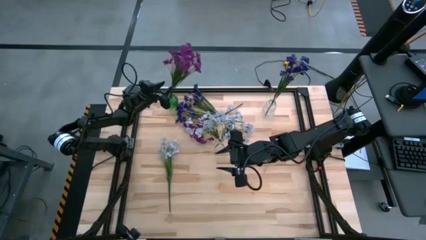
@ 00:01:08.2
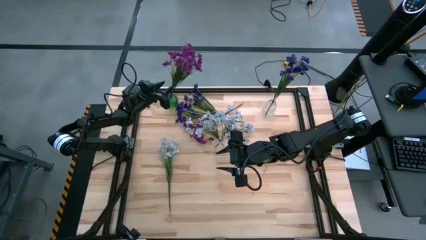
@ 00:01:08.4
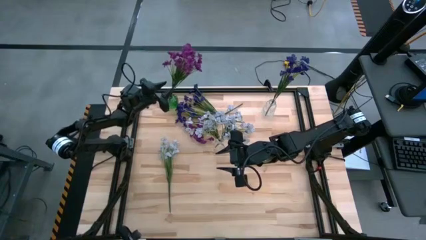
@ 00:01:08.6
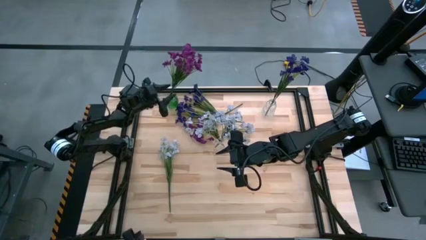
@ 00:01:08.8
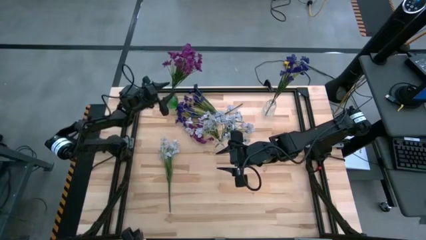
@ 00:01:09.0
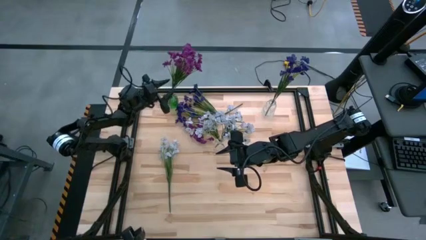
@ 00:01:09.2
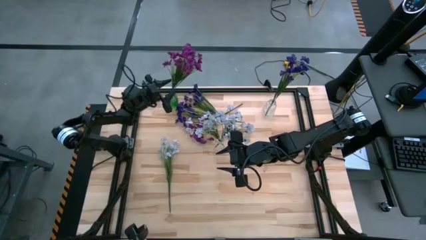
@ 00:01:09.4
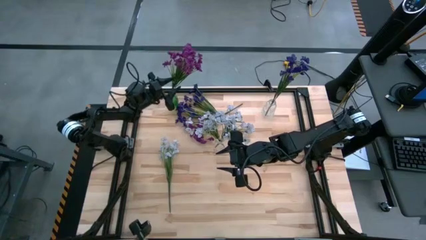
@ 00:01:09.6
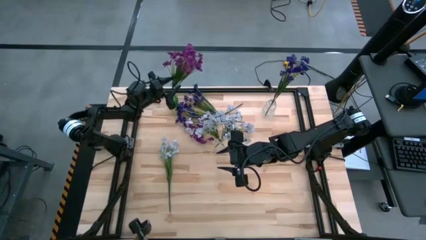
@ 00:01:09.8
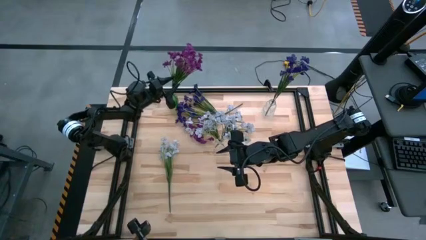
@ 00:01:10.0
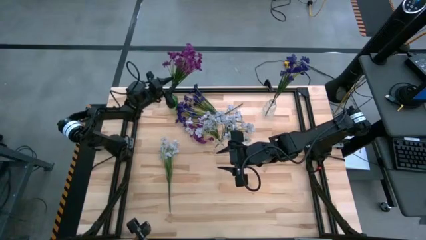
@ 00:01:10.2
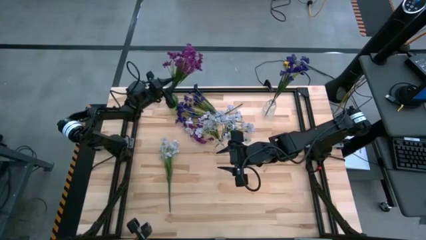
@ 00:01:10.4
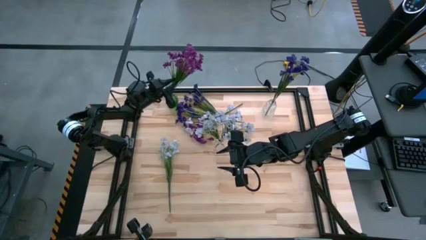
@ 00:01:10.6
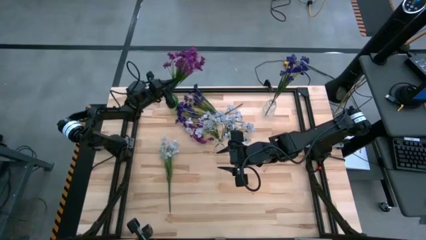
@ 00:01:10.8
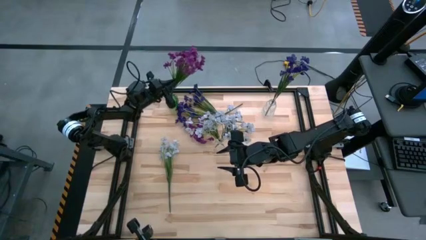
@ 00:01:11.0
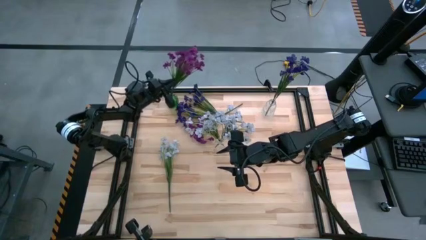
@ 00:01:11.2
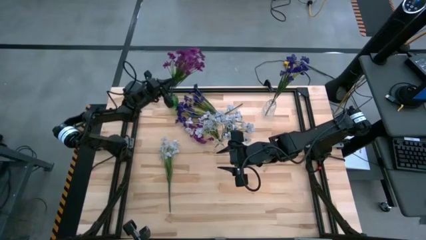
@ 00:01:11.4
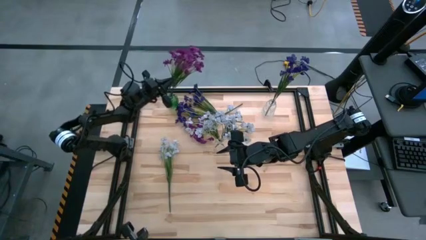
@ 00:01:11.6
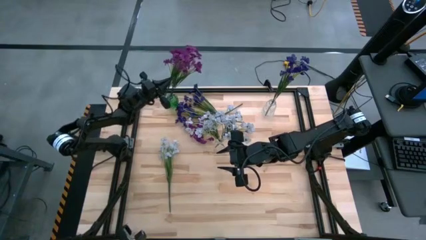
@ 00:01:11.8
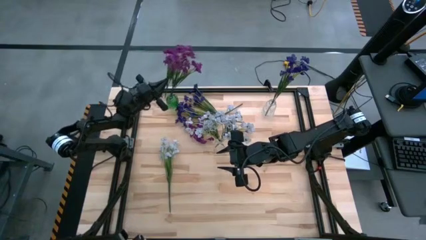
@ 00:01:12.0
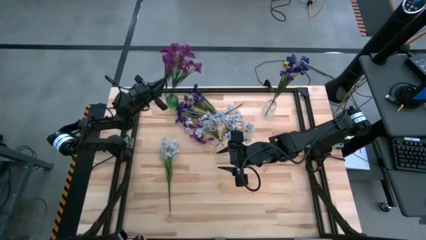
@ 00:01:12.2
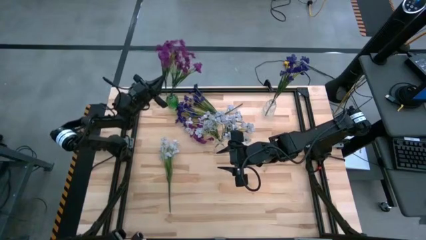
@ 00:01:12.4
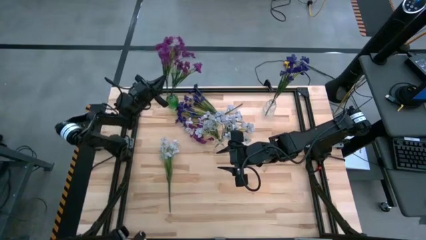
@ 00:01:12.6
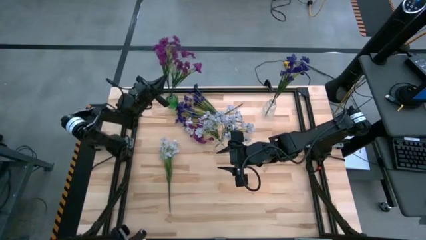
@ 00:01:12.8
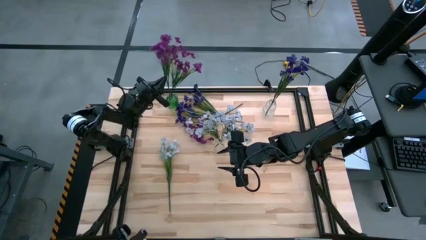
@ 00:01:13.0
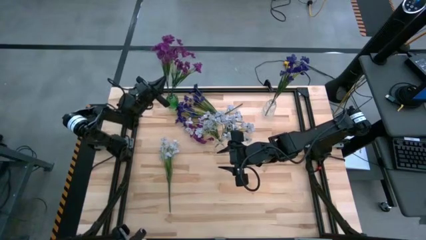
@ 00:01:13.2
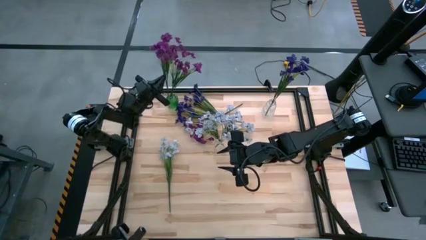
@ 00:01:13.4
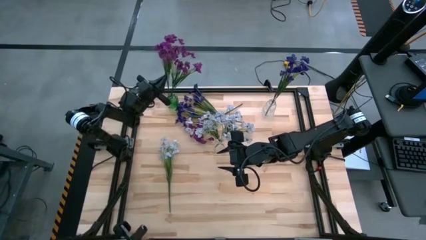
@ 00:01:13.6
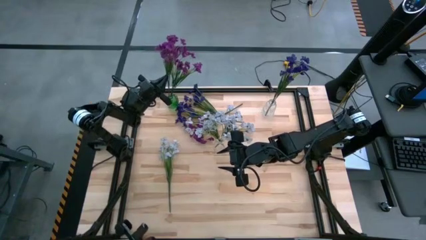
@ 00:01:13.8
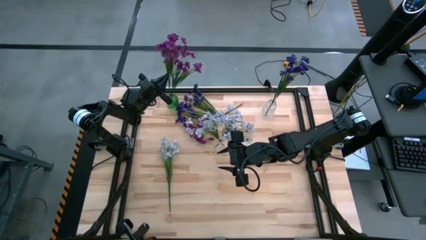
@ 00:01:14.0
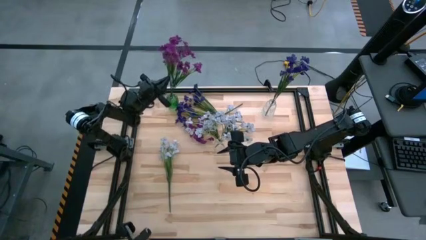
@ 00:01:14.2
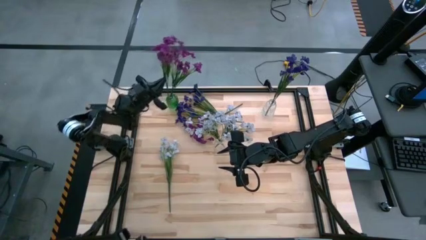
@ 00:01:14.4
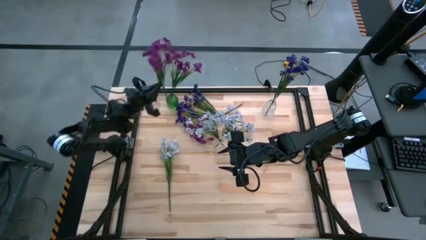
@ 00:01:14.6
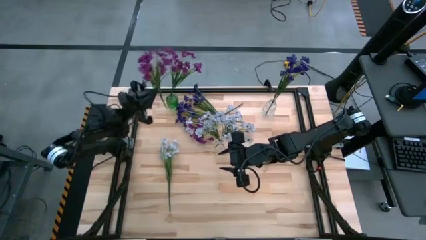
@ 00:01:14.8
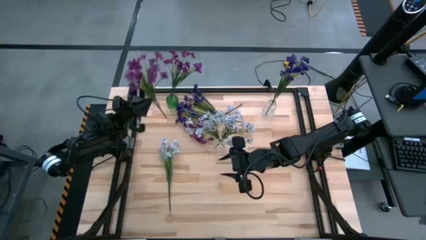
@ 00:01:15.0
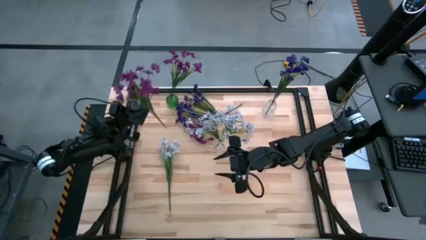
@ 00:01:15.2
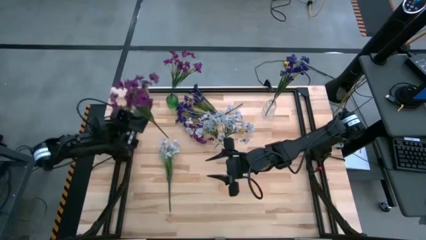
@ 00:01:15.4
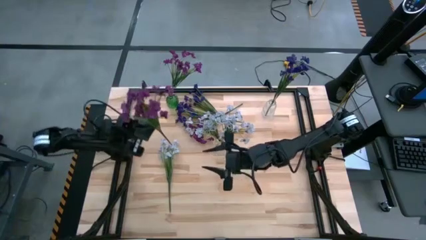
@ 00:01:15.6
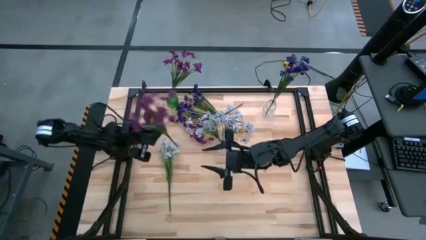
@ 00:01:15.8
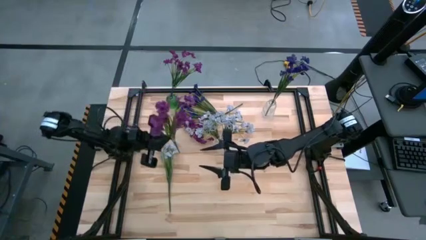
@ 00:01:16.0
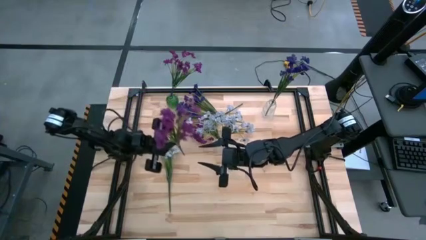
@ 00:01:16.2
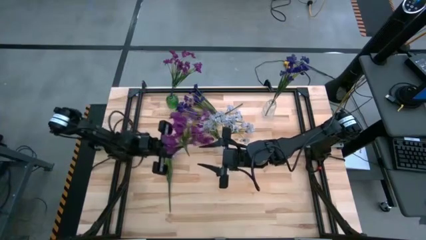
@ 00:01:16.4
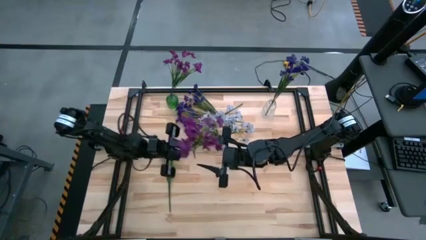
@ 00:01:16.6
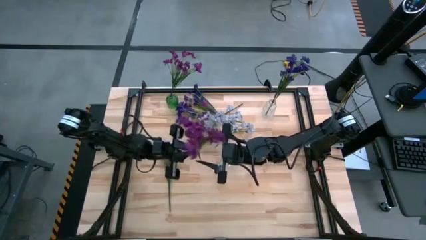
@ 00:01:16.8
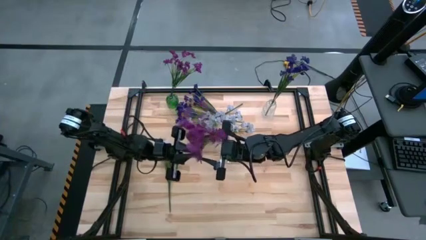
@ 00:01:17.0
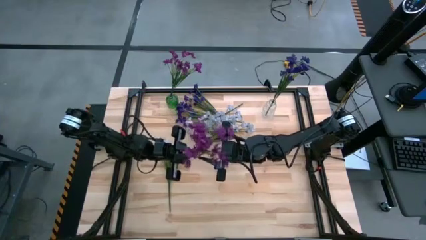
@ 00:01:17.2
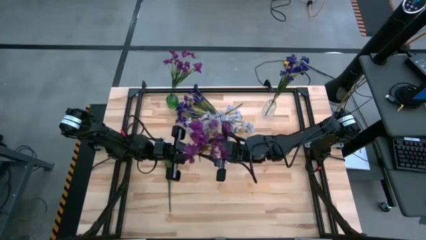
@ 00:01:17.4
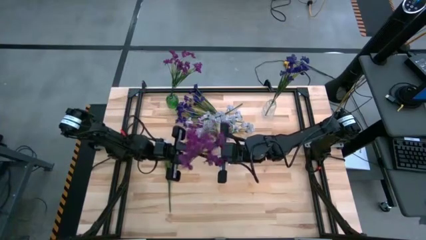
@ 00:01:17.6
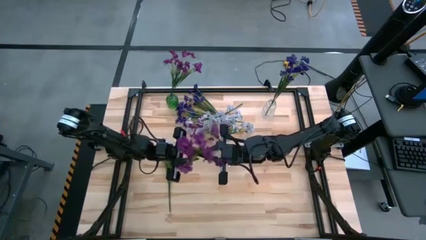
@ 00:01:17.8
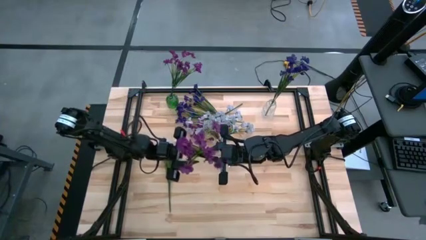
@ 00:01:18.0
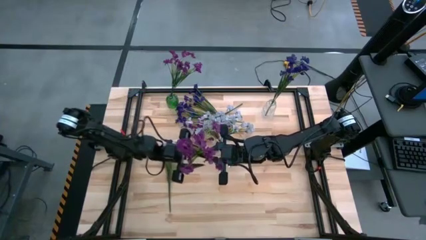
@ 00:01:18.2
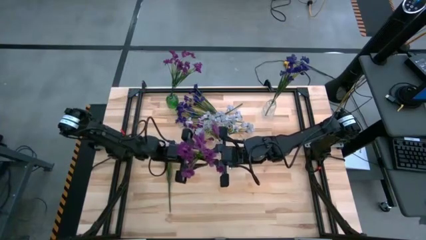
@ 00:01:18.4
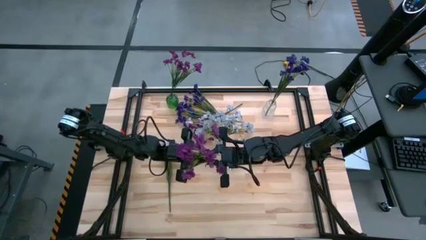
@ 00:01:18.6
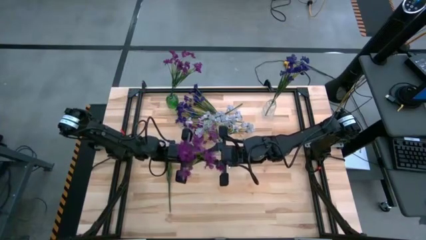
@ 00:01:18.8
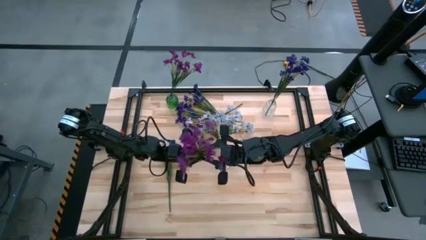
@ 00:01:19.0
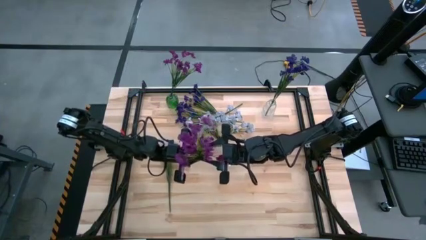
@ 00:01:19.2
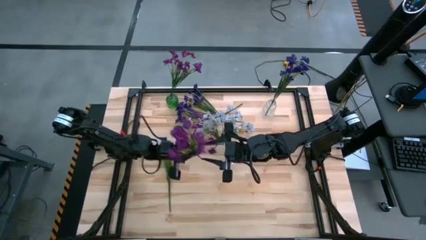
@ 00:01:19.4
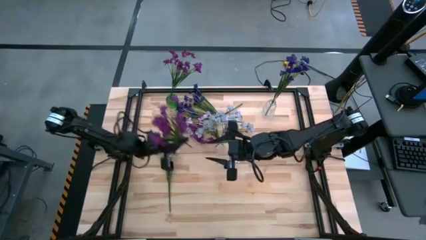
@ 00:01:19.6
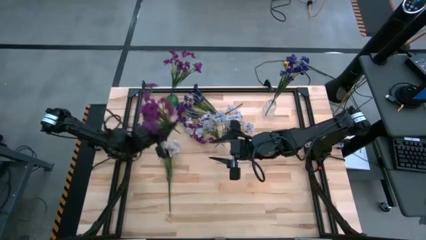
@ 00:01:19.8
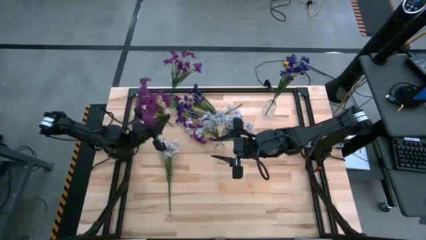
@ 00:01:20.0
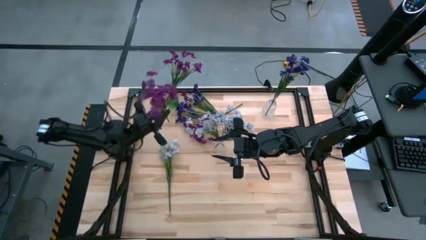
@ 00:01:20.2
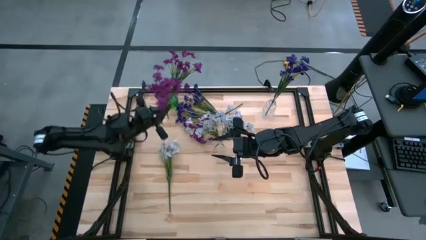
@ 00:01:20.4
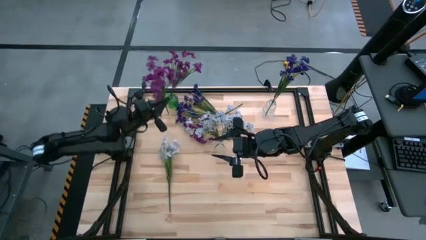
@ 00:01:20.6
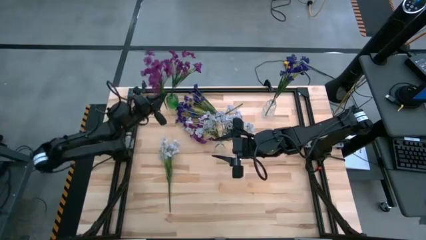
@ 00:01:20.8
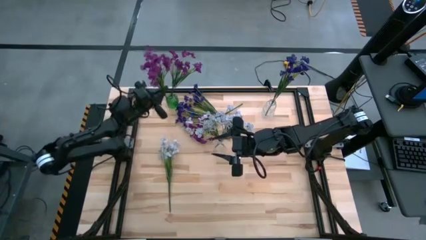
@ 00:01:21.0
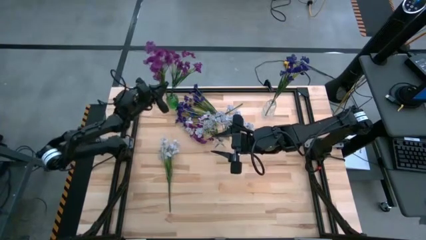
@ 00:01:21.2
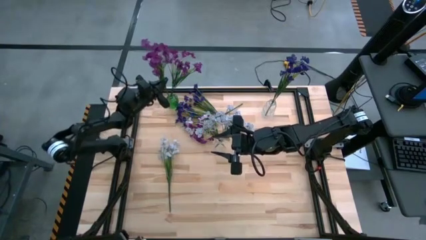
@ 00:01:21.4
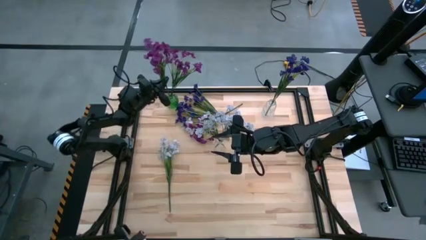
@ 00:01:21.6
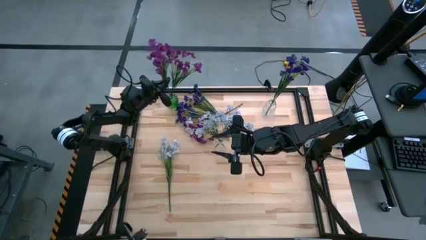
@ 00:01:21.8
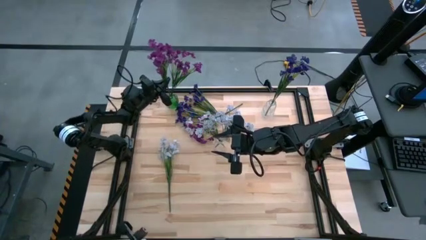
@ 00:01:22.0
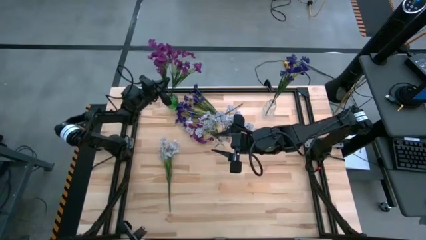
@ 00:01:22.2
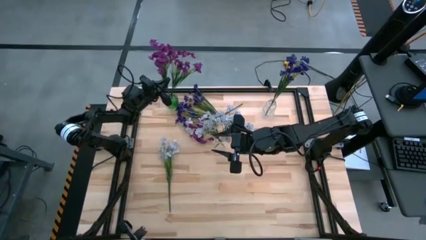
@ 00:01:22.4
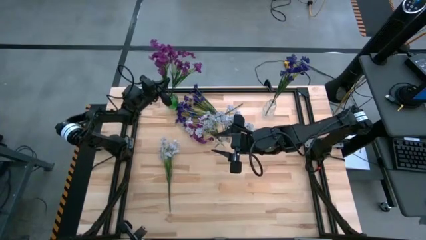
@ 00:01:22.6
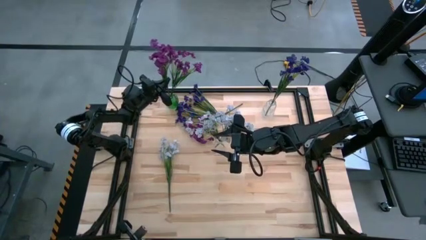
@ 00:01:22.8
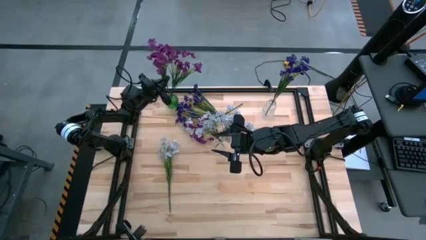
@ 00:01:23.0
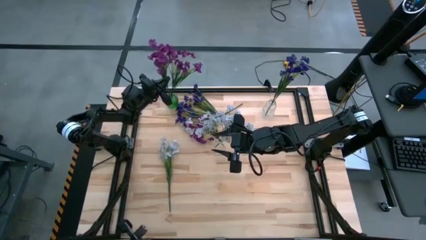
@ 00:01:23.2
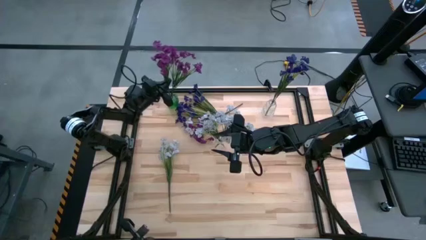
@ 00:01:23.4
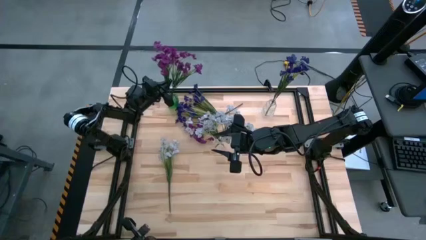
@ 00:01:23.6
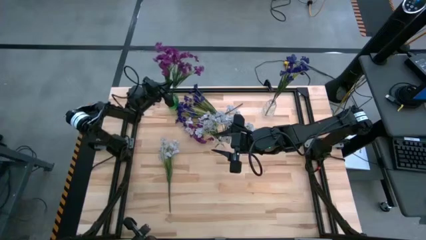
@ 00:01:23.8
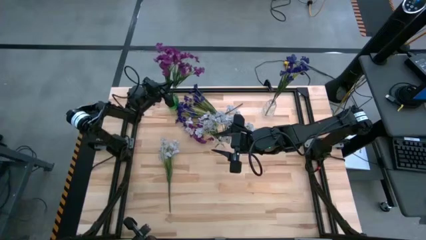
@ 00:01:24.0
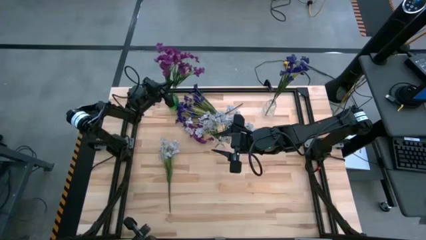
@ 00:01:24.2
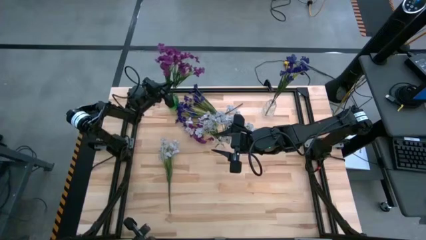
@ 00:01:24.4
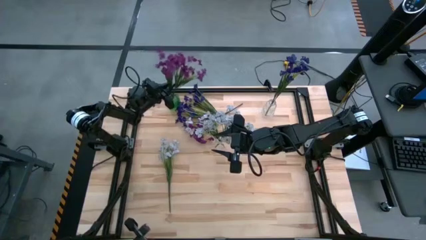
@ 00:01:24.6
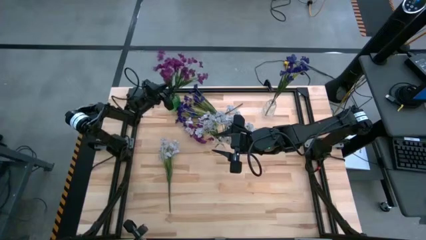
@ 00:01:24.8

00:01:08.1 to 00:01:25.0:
Task: Sort flowers into vase by color
Put the bottom violet flowers into the green flower vase
